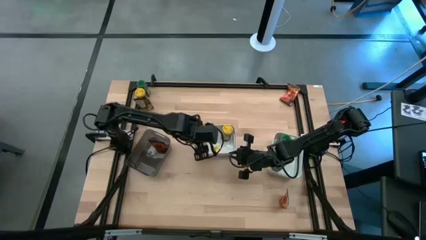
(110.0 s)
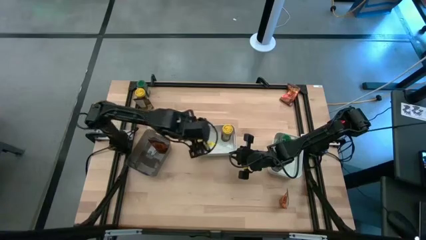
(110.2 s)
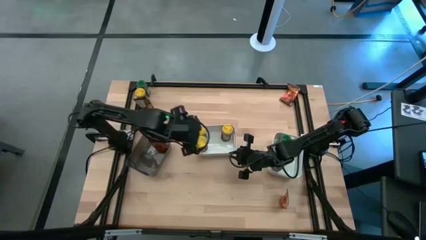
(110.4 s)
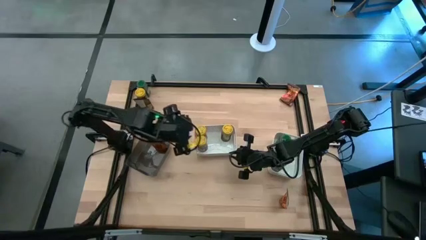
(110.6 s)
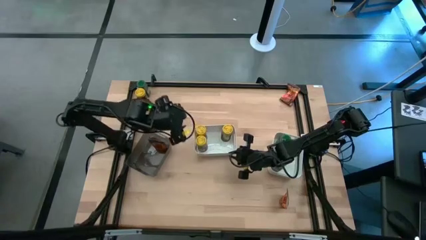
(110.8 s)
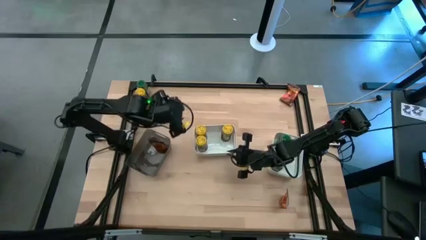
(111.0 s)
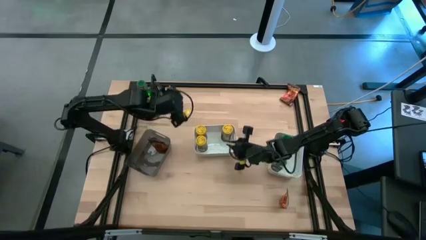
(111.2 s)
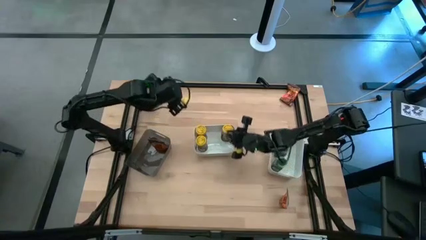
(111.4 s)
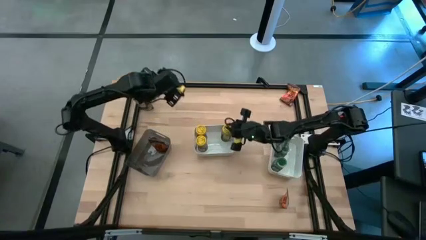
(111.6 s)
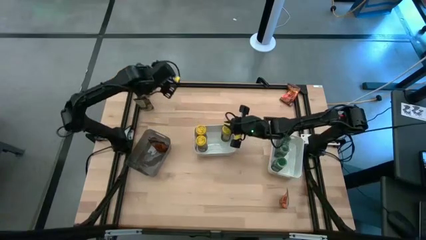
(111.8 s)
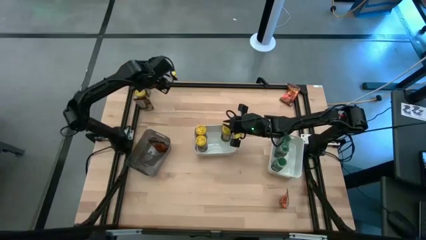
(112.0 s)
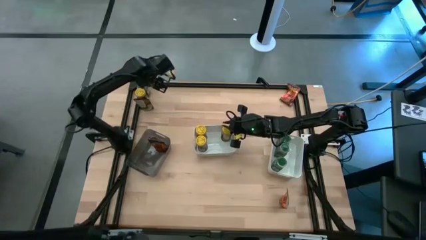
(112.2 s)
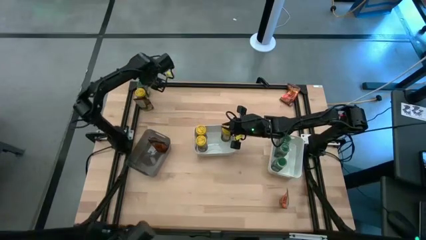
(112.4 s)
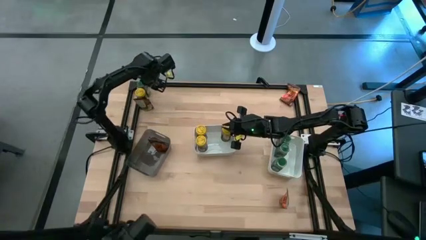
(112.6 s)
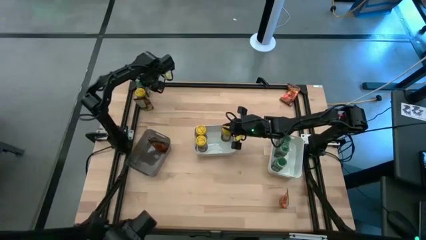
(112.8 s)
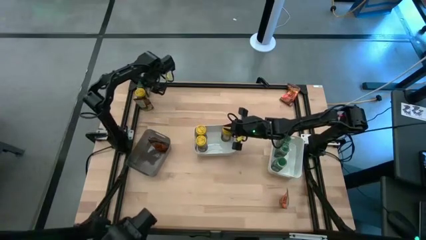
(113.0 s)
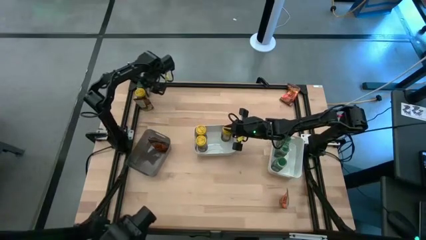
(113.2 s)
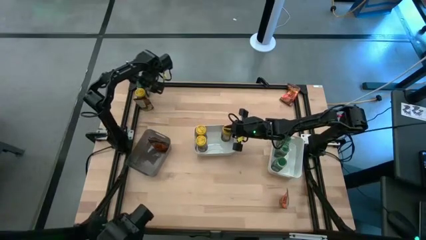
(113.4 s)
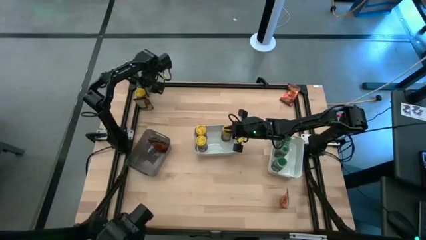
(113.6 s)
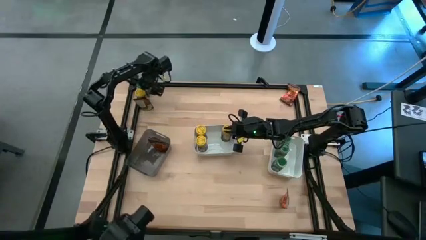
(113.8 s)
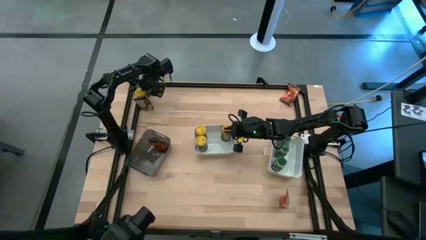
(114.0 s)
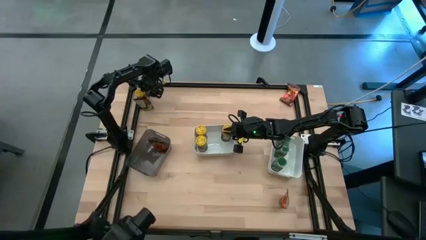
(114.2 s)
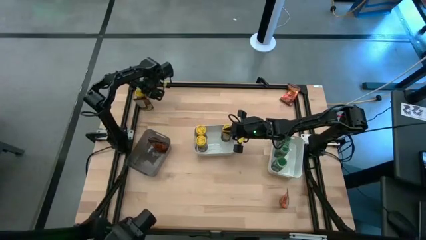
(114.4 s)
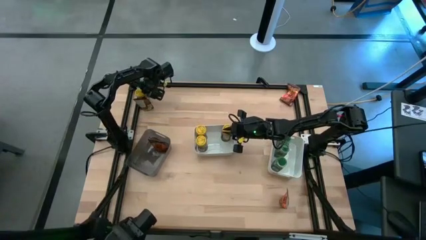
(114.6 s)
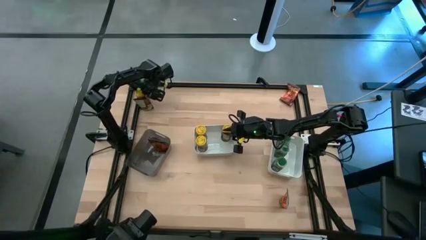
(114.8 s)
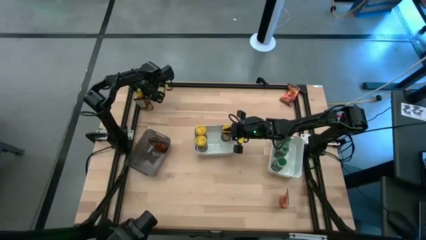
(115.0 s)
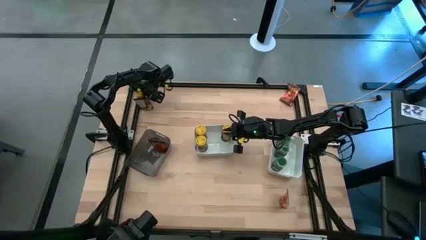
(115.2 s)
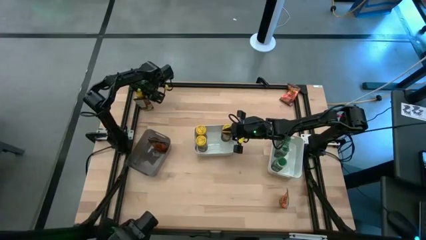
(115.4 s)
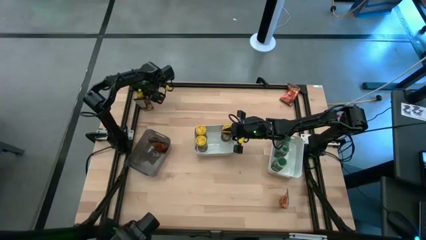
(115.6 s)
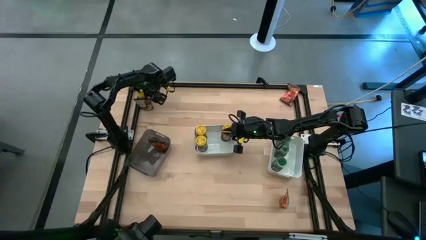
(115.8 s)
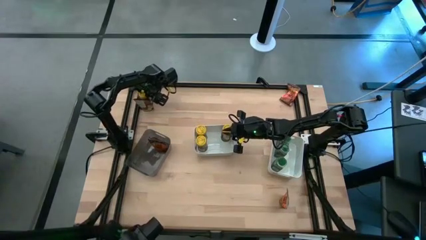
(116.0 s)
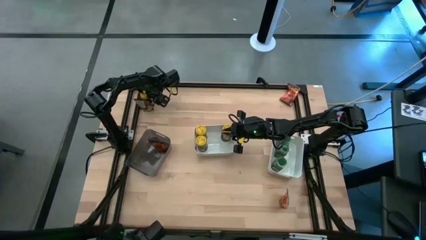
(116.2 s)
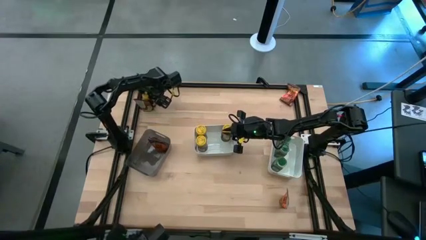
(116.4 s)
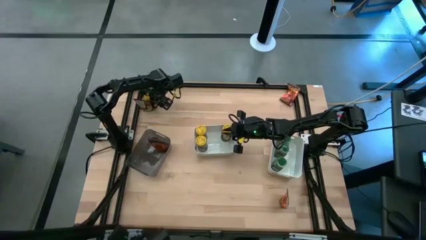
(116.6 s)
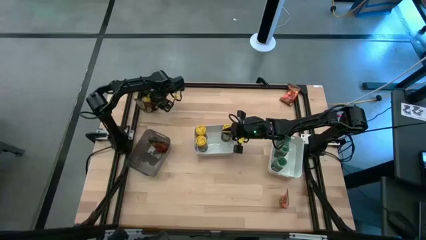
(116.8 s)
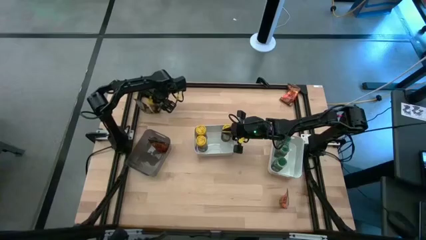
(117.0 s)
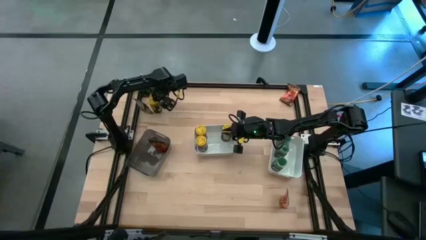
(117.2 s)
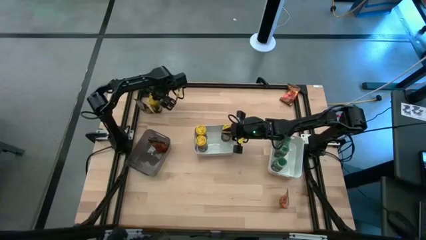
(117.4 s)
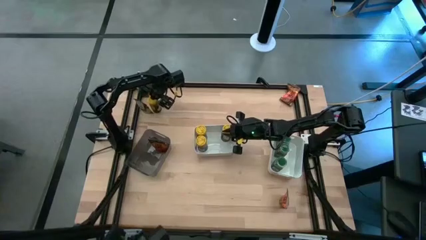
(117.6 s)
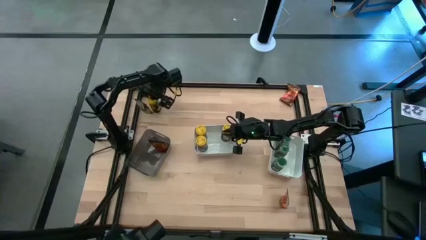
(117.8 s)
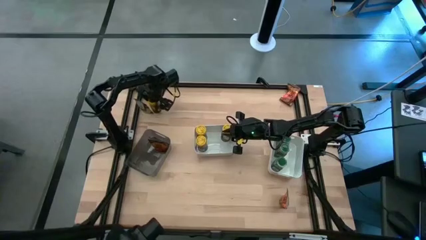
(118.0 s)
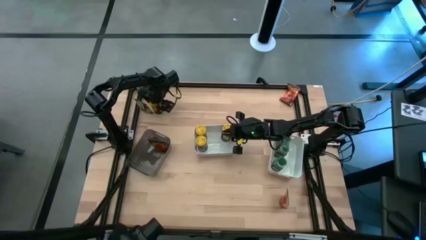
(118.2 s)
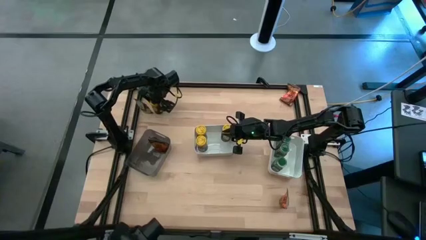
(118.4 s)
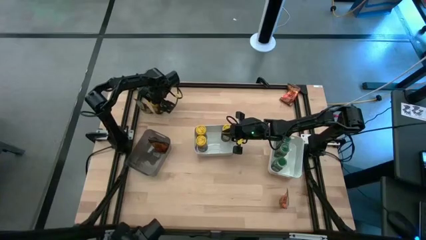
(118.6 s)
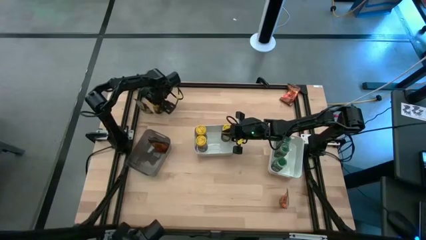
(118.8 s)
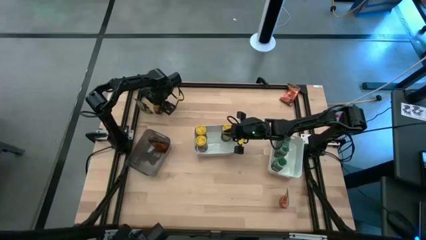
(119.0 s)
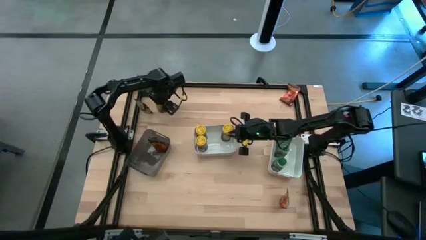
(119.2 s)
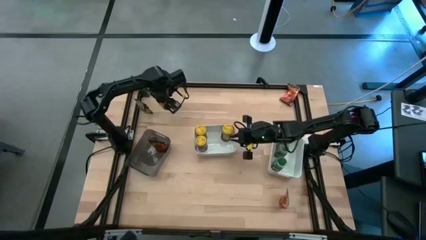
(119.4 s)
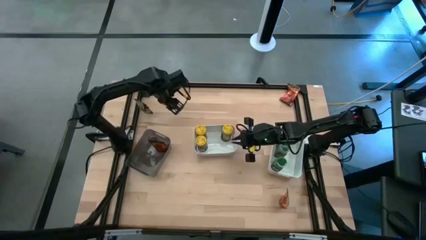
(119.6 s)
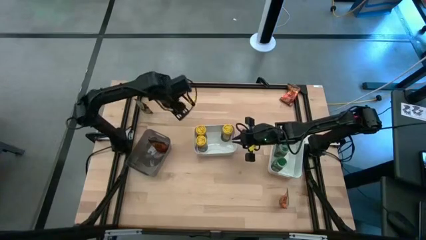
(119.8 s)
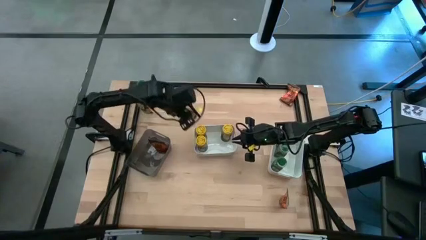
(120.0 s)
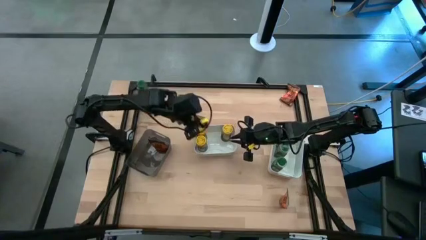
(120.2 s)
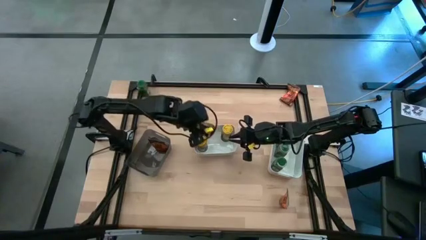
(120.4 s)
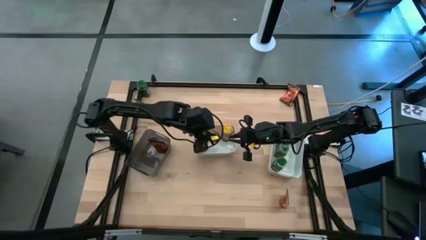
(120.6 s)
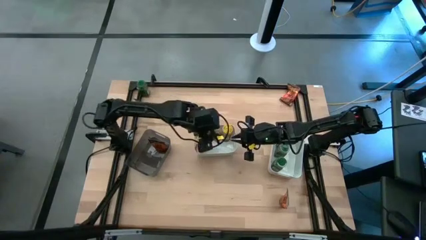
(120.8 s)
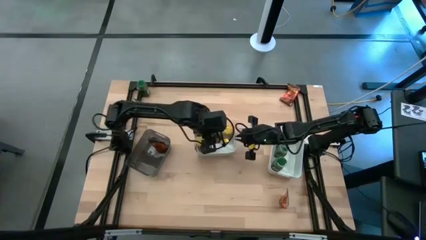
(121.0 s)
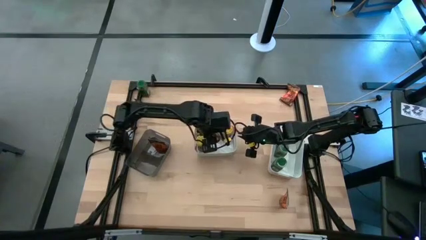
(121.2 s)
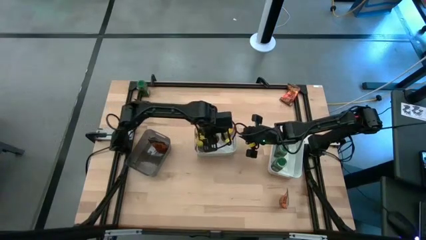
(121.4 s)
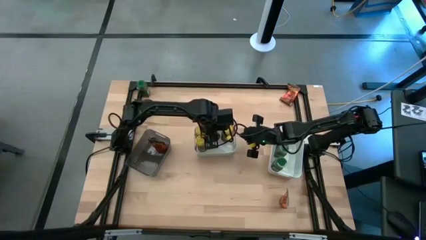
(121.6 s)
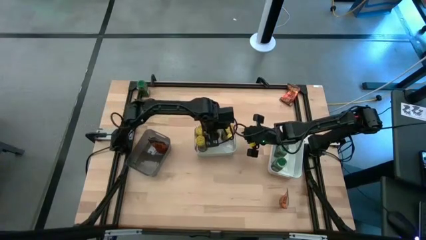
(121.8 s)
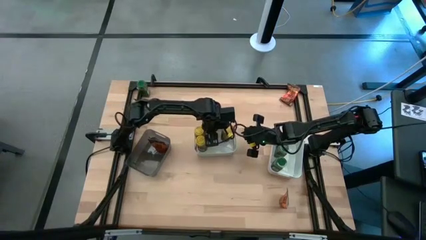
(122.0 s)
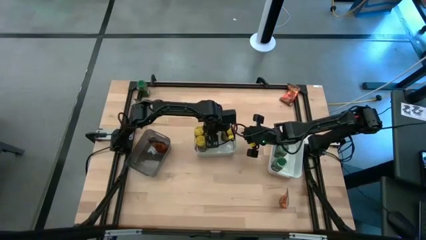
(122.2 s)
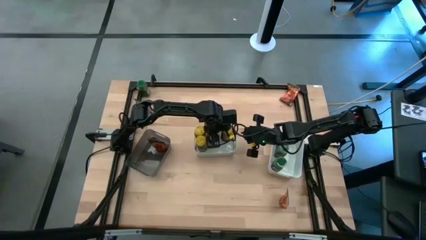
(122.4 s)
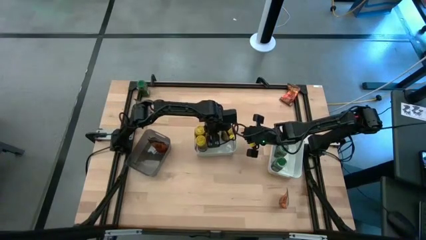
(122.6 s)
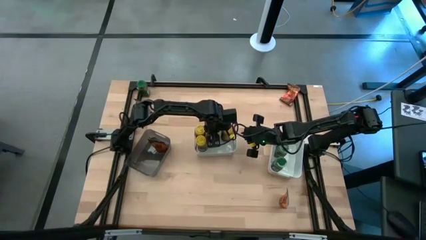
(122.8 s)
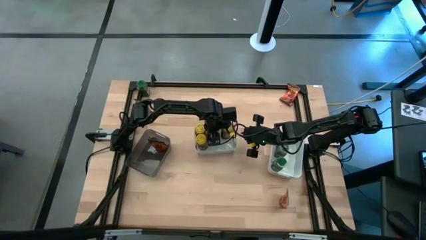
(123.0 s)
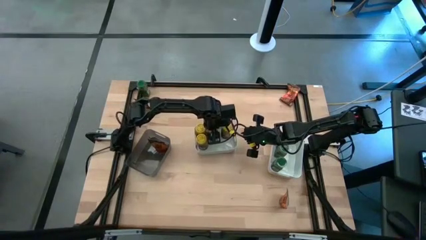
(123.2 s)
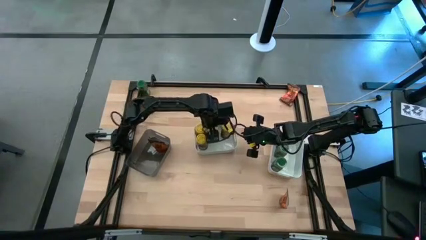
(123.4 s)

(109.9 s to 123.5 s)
Task: Sort spices by type
Put the yellow seasoning bottle into the left white bin

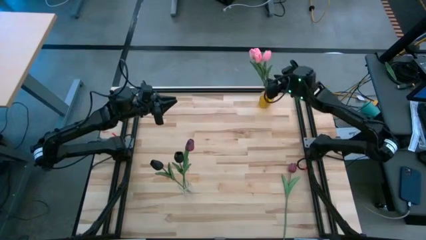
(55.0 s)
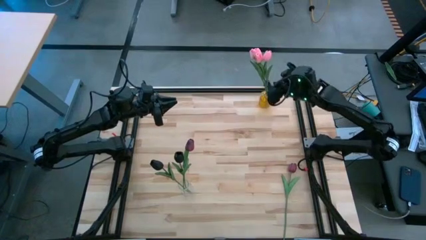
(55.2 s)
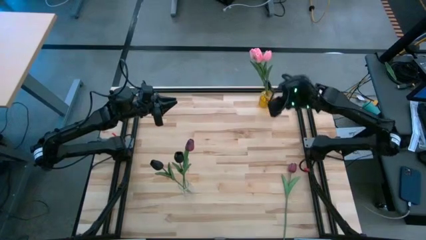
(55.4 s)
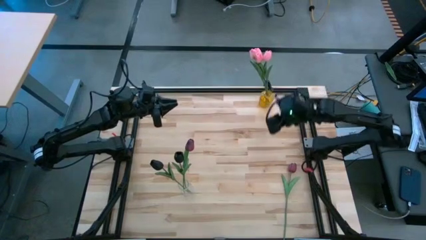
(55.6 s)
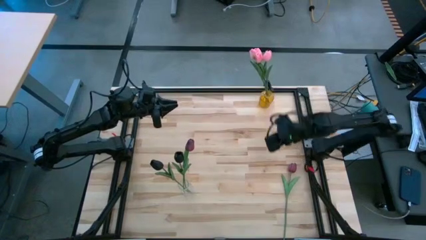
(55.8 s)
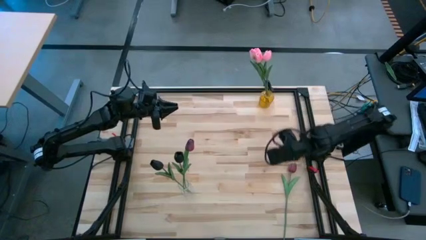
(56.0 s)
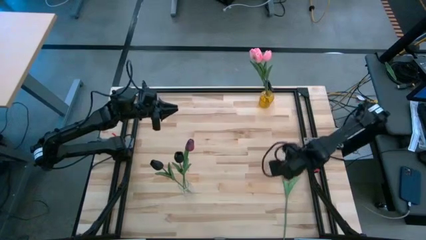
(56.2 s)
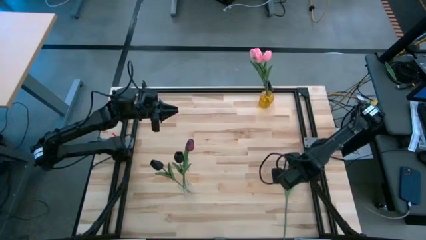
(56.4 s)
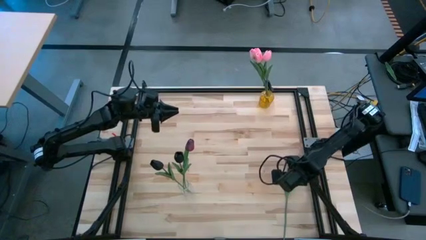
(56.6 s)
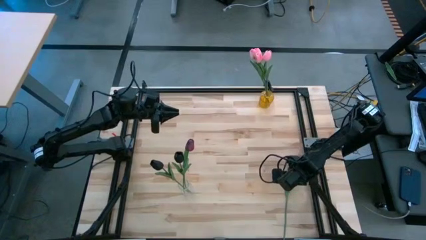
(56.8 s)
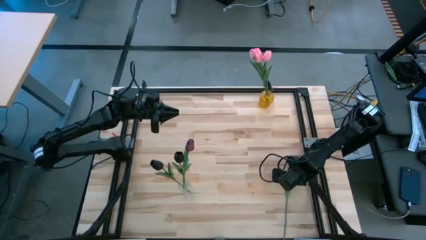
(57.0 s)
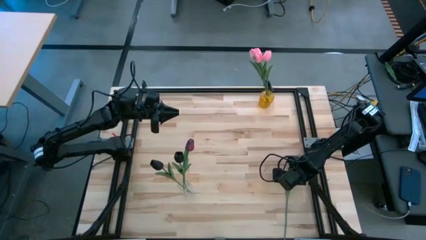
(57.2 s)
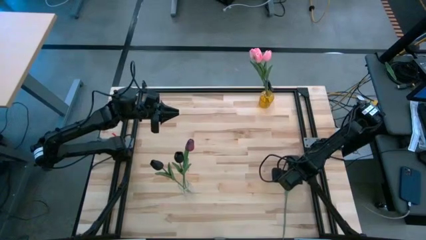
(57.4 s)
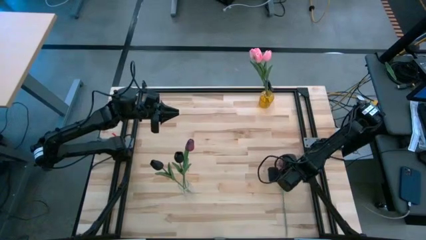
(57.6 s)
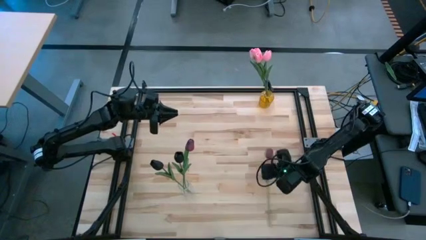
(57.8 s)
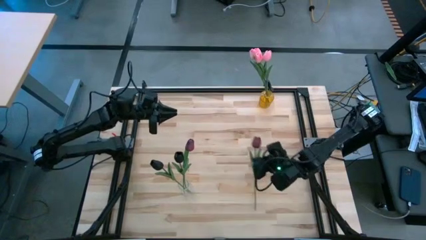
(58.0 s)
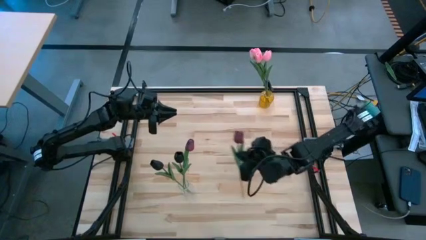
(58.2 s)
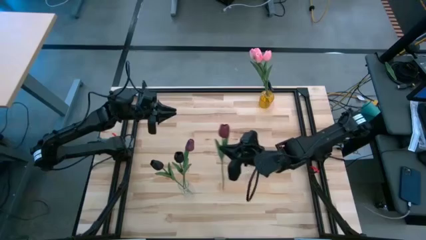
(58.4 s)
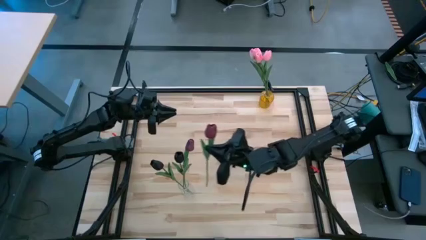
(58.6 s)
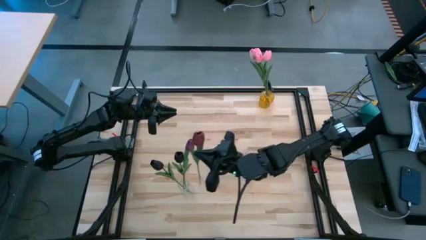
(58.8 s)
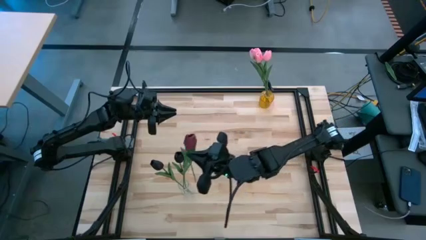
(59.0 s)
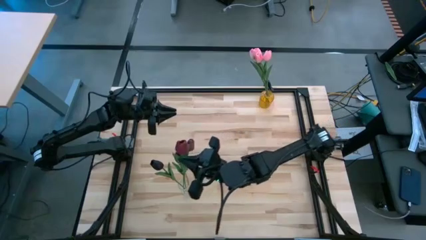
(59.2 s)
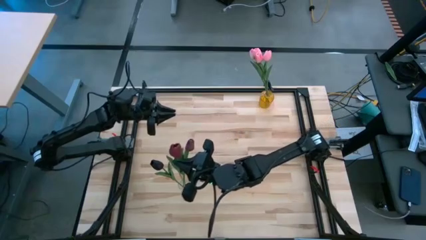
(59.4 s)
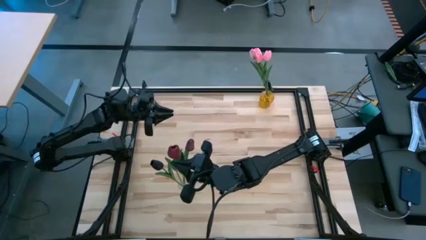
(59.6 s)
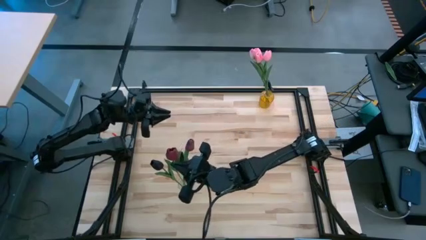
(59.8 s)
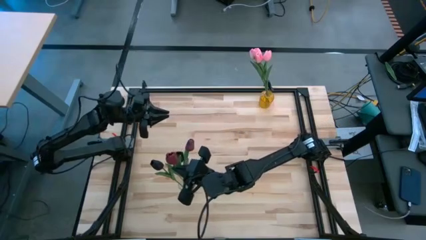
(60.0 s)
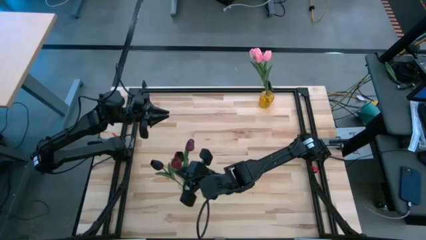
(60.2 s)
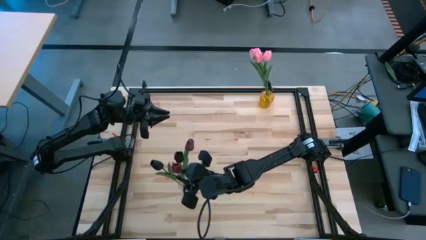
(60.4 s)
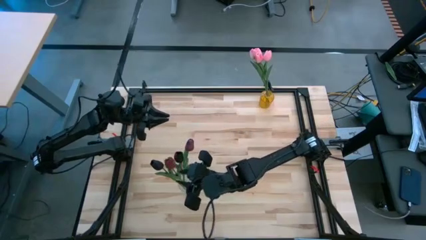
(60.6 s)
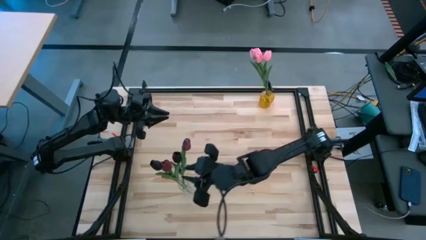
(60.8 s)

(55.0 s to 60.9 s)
Task: Sort flowers into vase by color
Put the red tulip flower into the crystal vase
